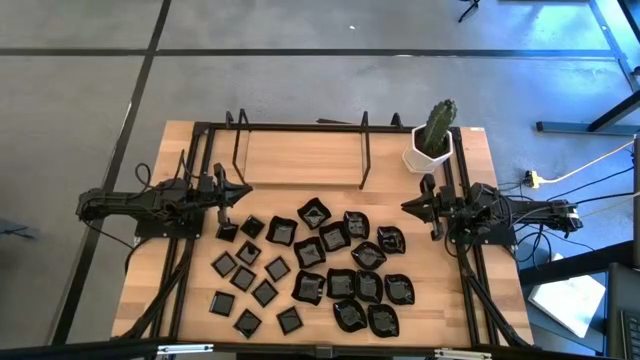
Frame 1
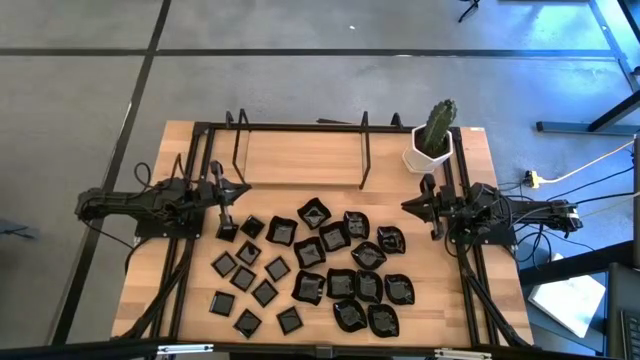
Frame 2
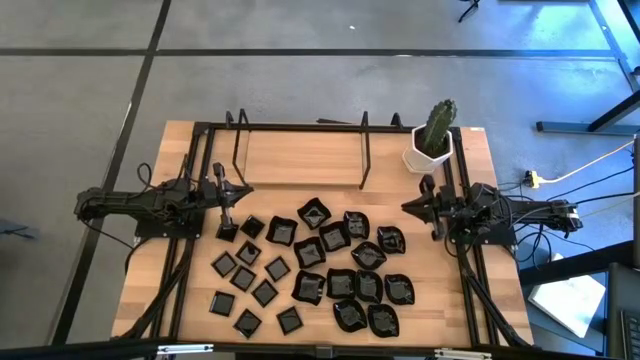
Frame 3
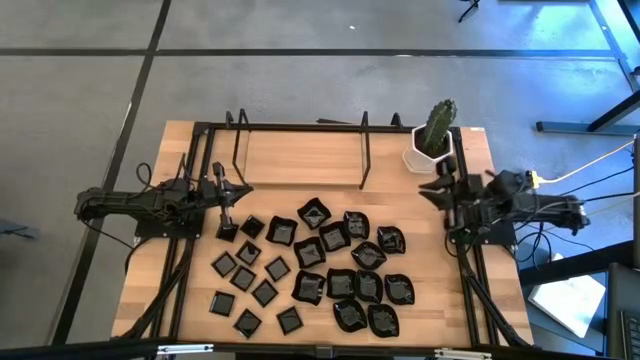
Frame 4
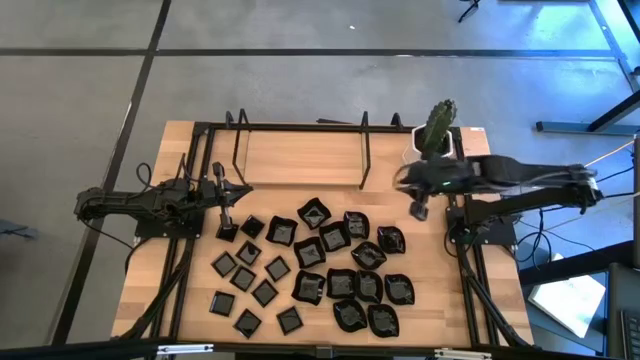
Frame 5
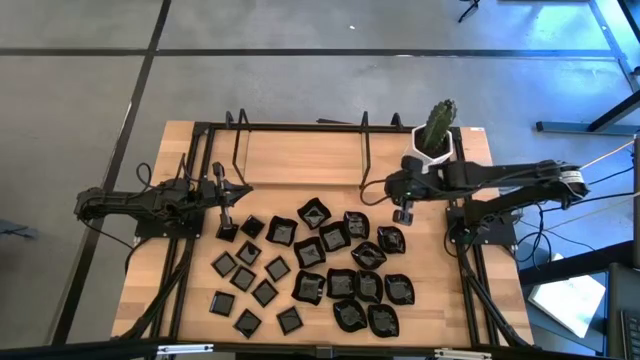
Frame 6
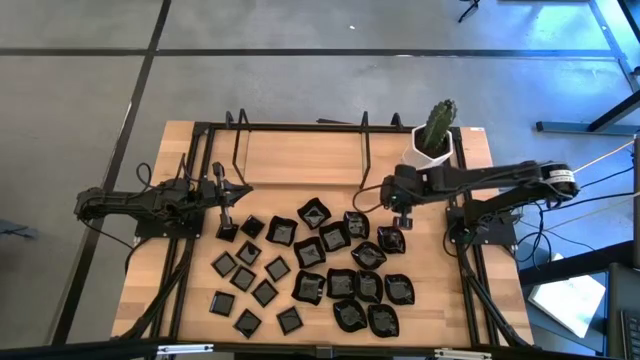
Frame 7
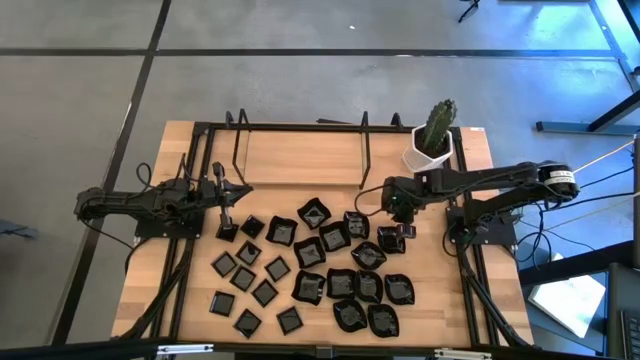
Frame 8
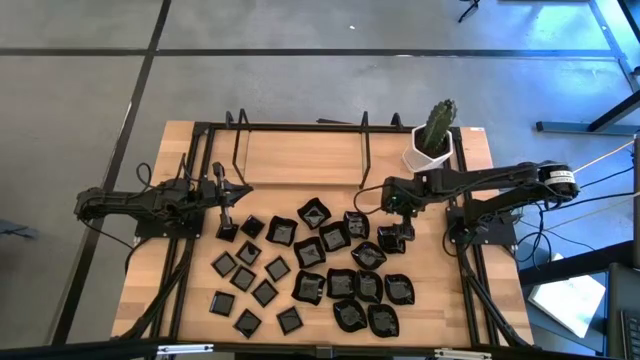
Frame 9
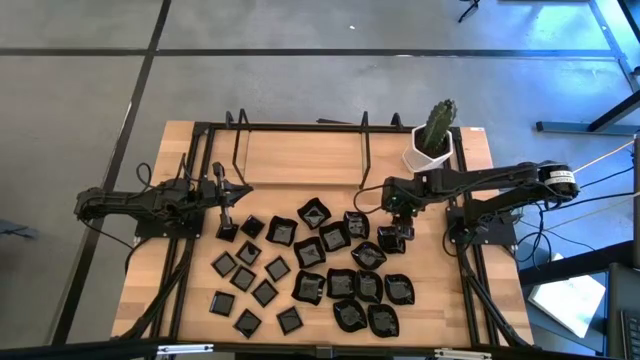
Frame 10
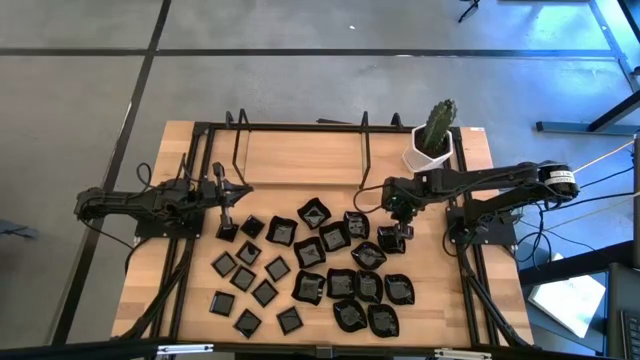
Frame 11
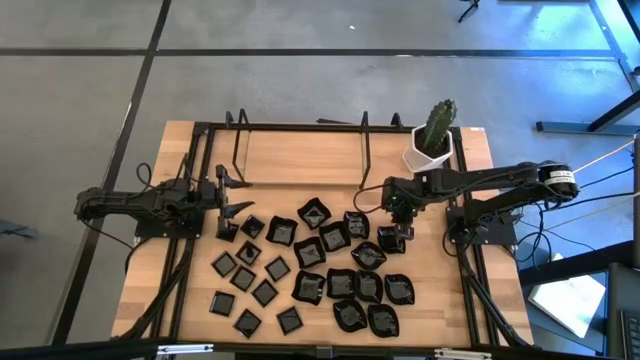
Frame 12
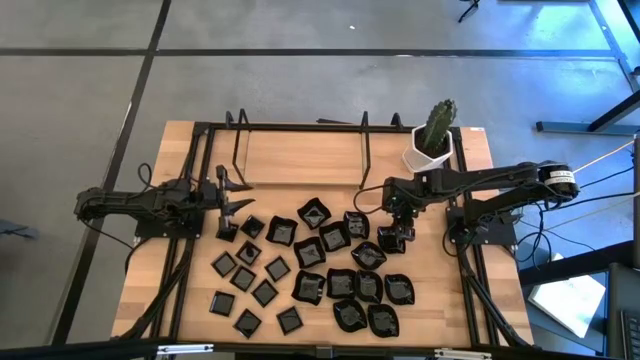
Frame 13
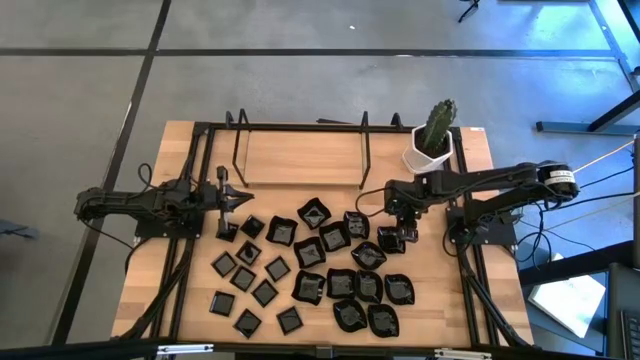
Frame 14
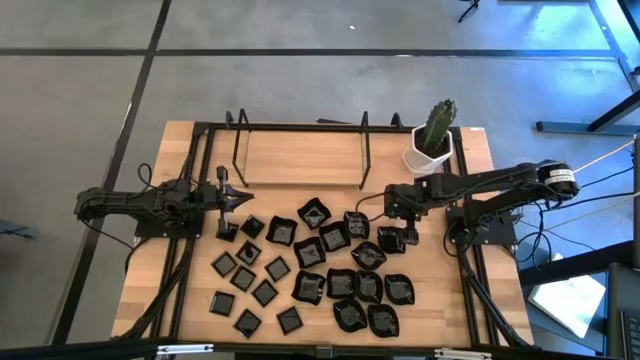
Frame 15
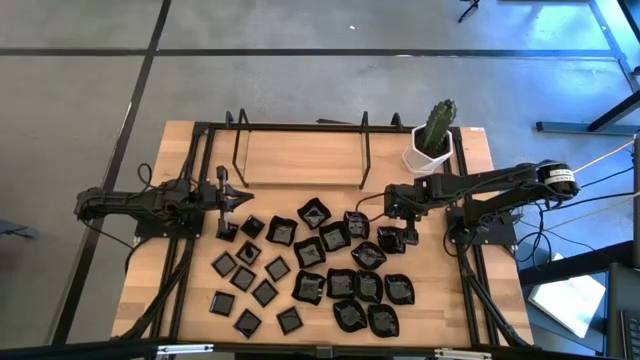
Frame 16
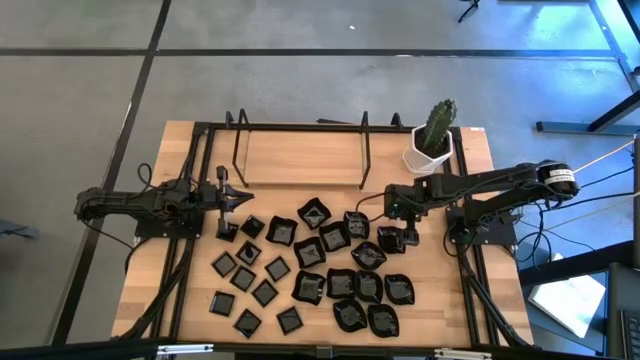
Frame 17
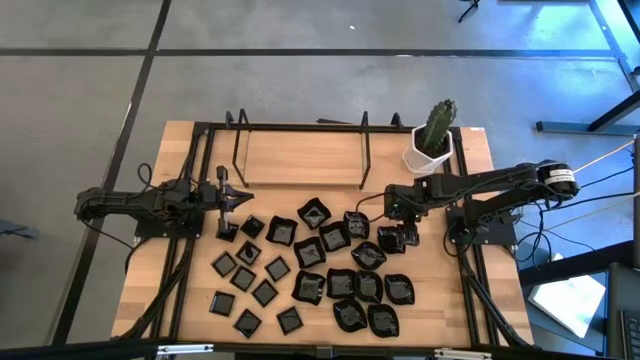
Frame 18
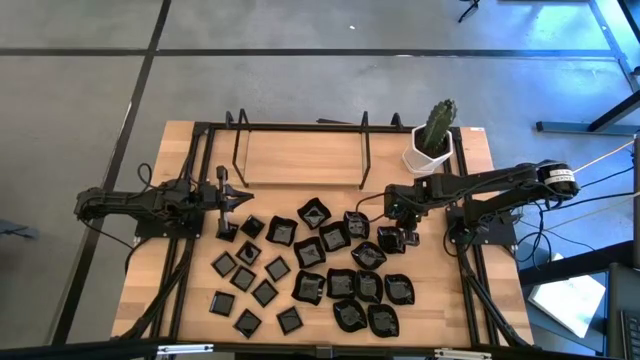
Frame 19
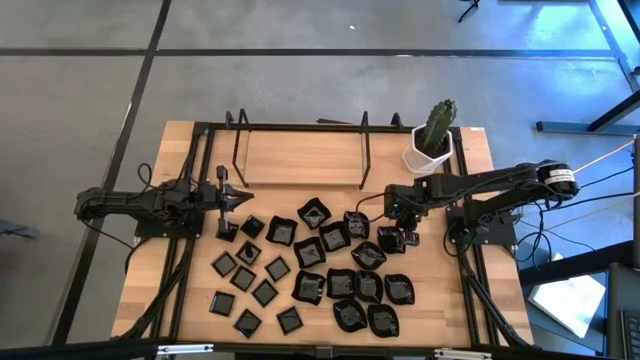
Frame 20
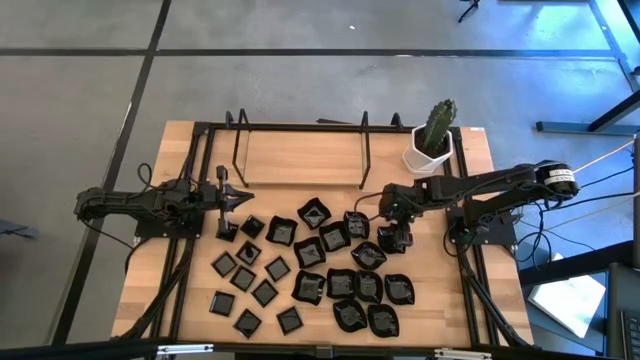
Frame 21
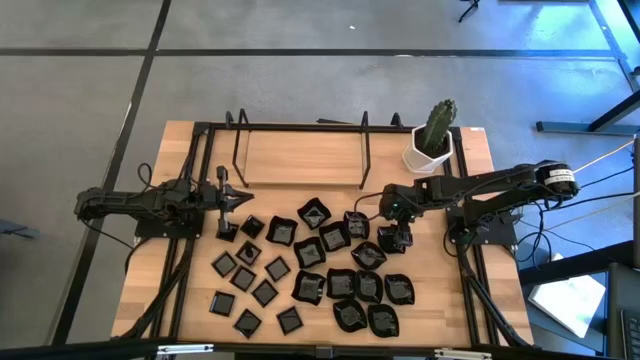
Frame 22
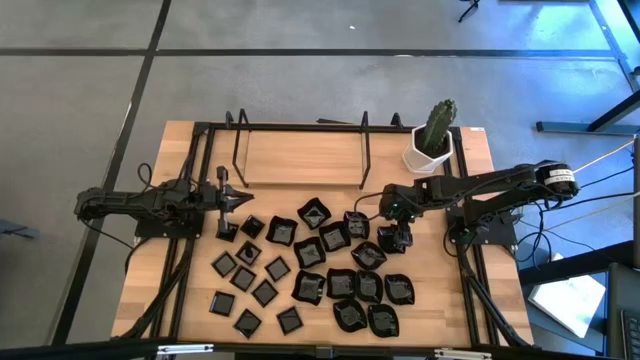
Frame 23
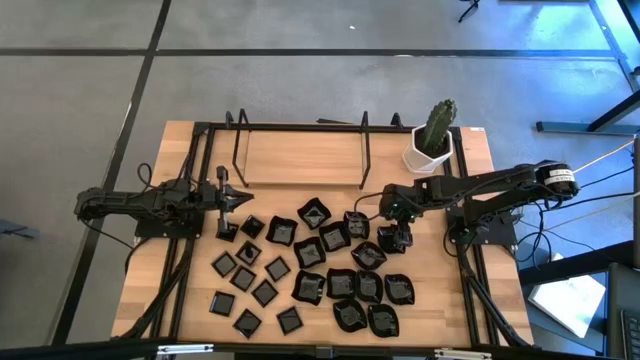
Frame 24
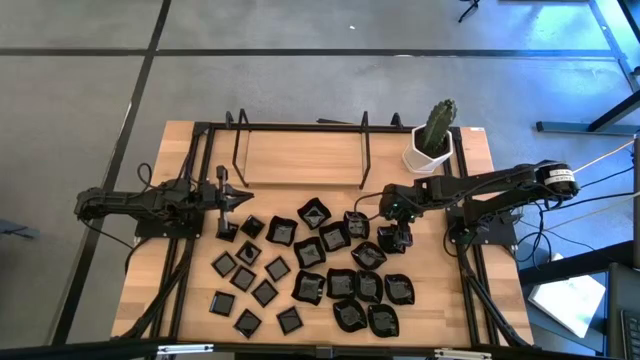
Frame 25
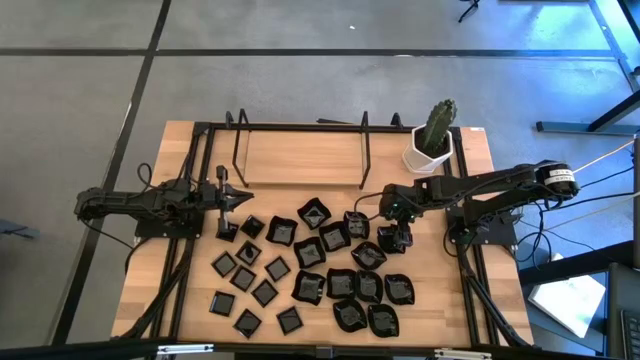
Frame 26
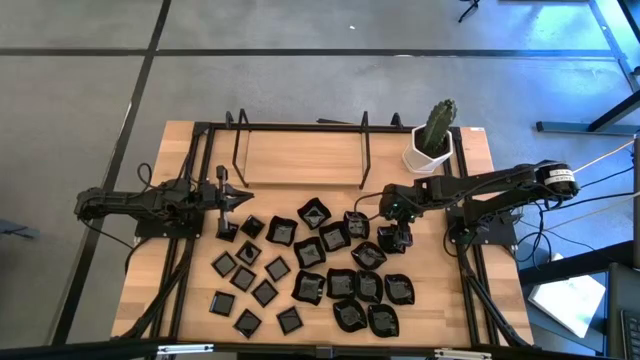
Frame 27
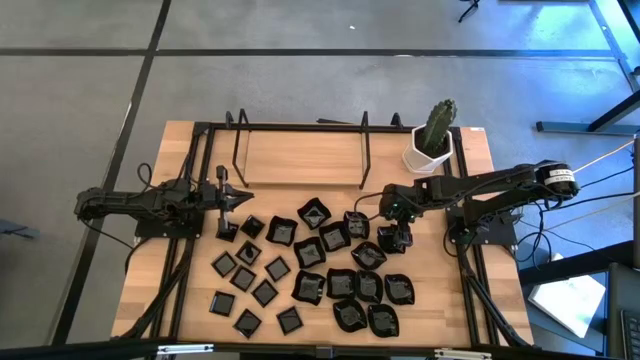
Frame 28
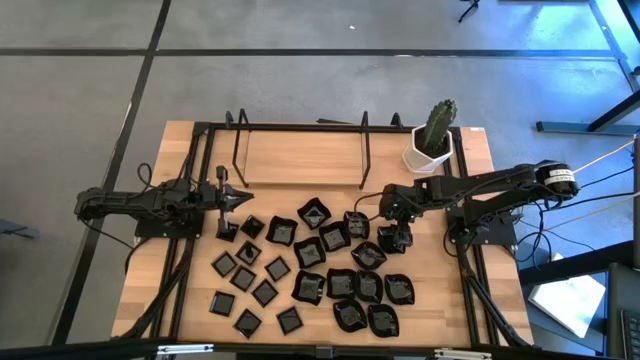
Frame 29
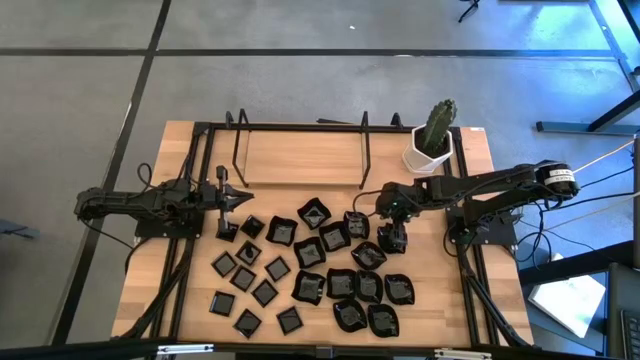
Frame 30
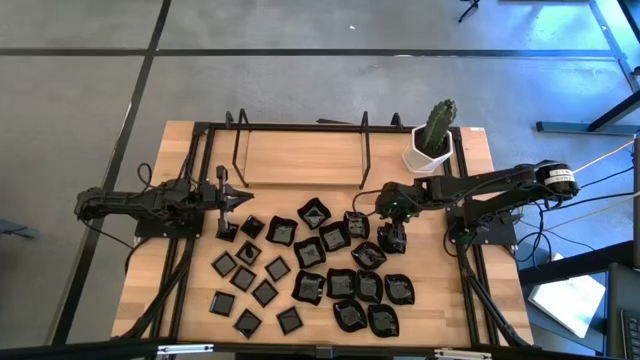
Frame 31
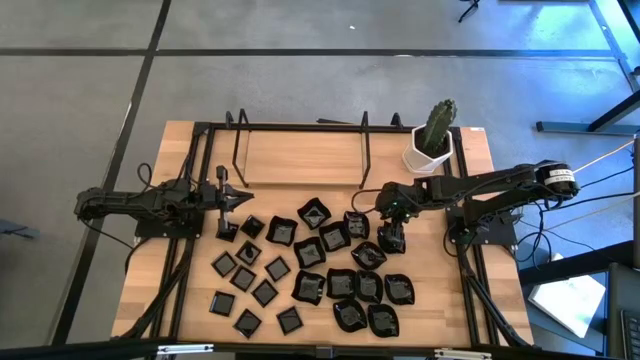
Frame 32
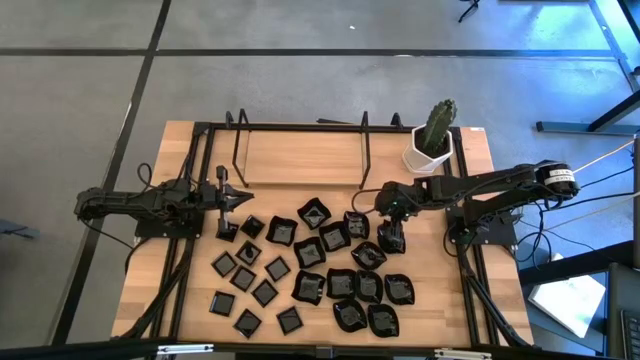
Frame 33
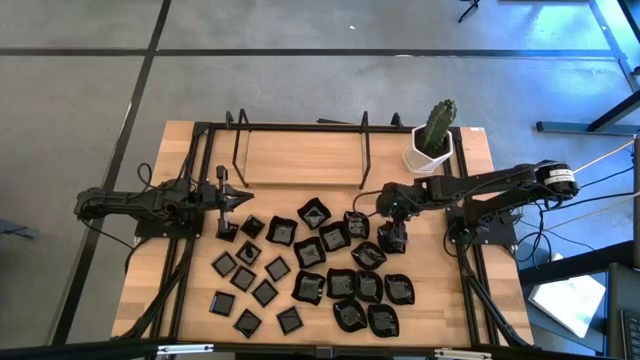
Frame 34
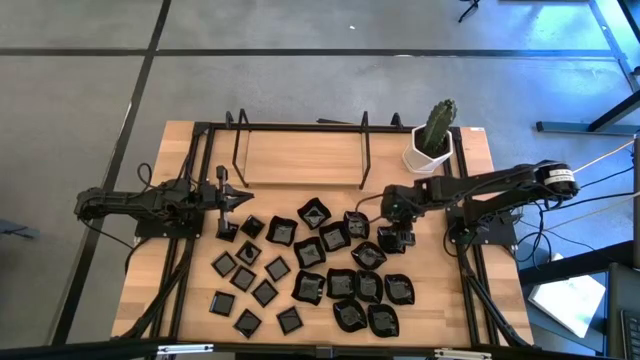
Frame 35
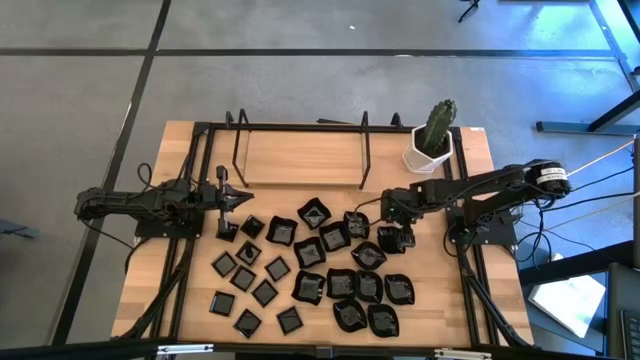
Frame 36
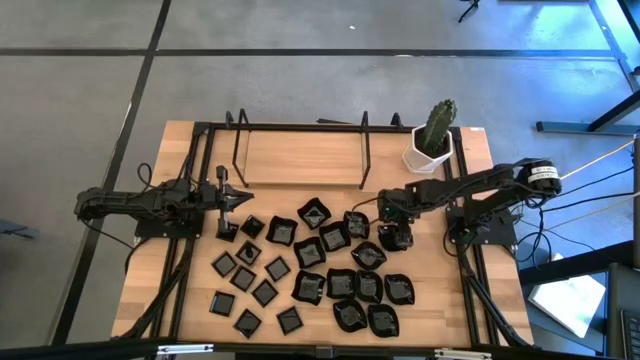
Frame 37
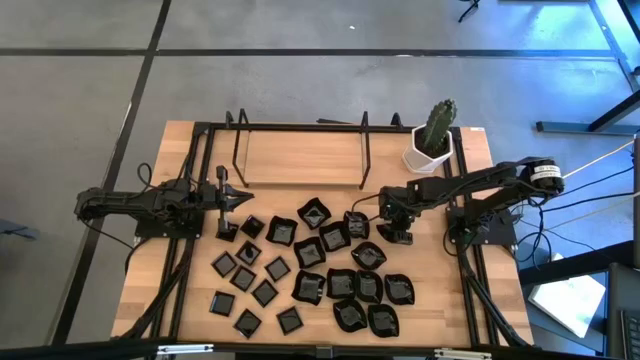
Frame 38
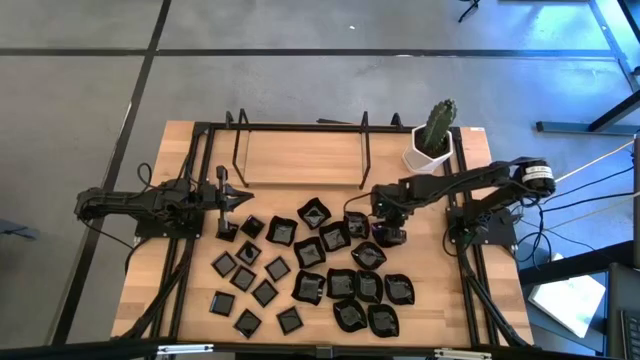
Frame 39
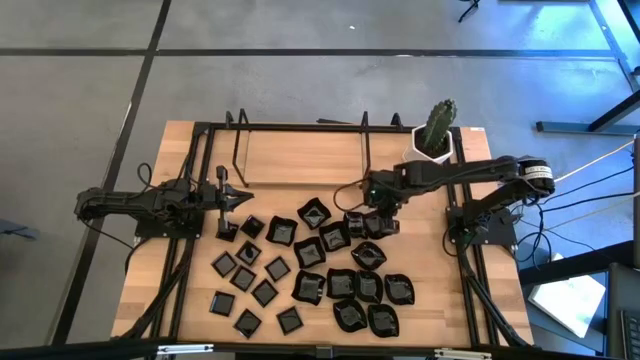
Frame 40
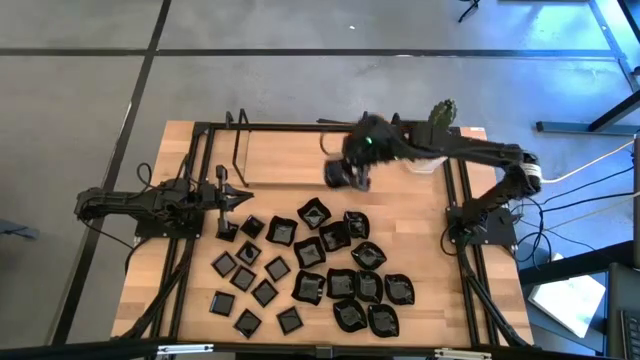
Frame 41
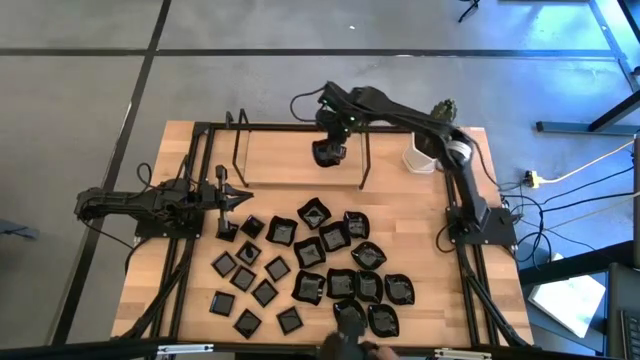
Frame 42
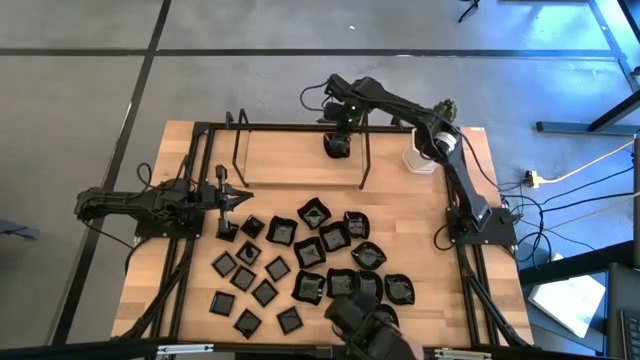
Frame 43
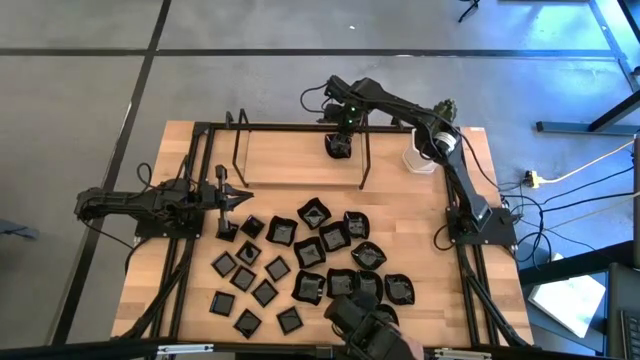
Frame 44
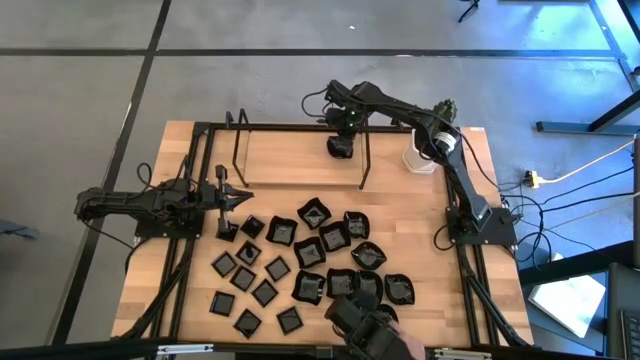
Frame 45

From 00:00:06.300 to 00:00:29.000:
Task: Pick & Place Mini shaped plates
Put the leaf-shaped plate on the shelf
